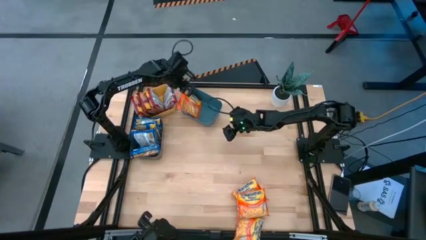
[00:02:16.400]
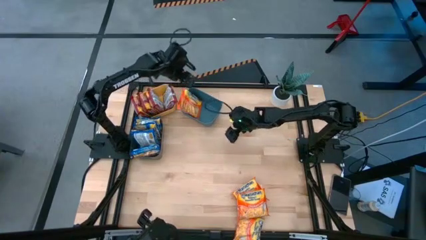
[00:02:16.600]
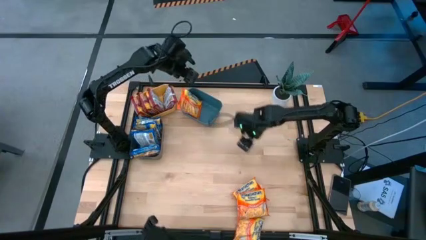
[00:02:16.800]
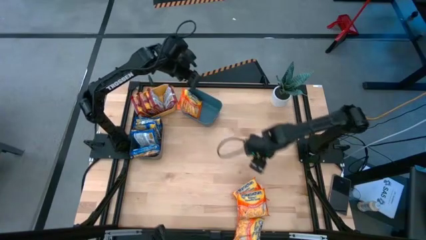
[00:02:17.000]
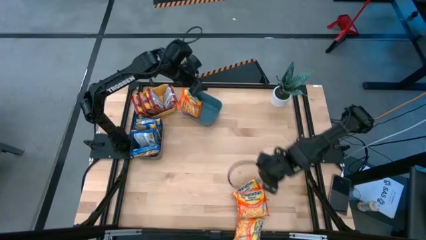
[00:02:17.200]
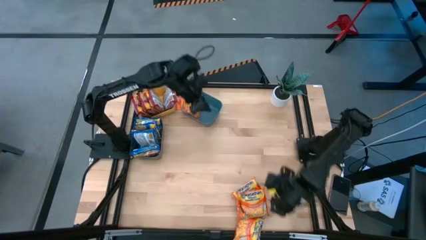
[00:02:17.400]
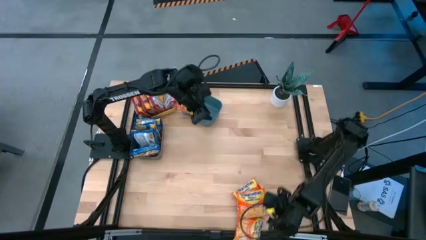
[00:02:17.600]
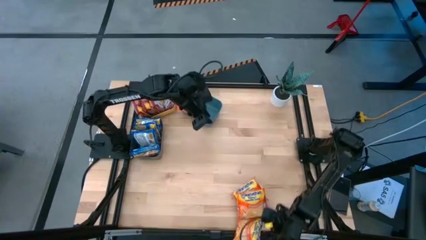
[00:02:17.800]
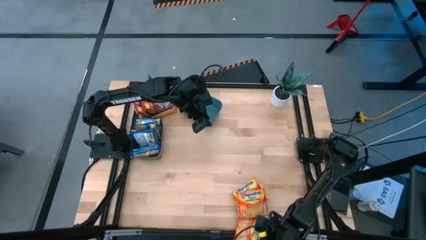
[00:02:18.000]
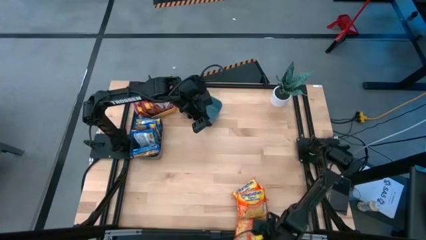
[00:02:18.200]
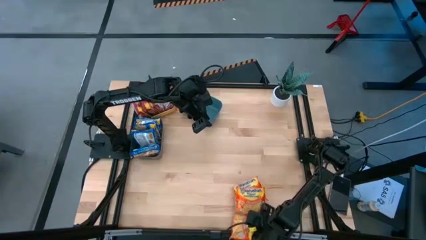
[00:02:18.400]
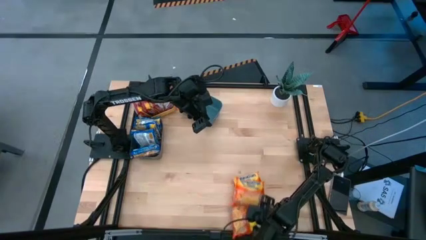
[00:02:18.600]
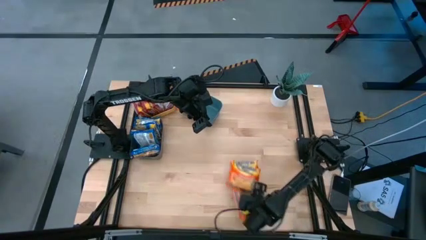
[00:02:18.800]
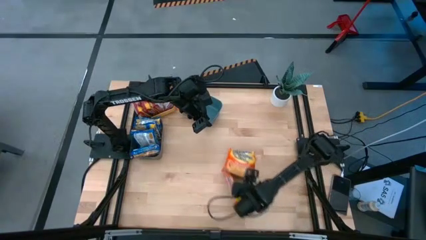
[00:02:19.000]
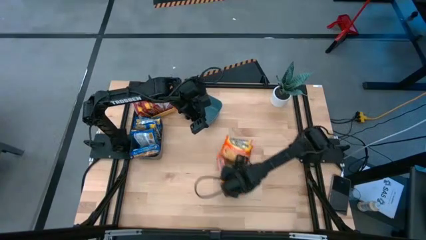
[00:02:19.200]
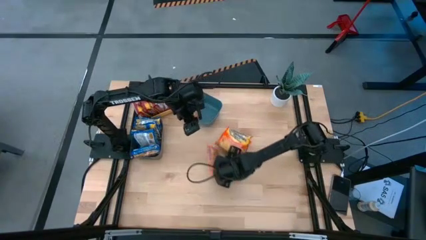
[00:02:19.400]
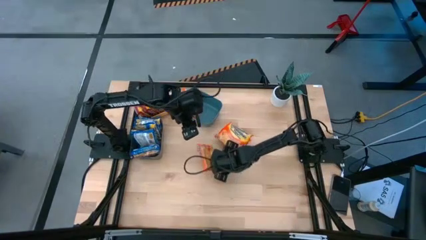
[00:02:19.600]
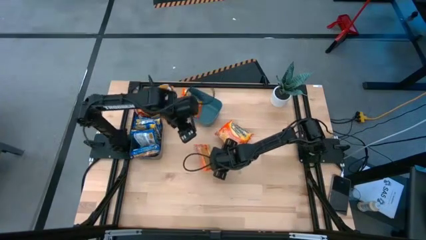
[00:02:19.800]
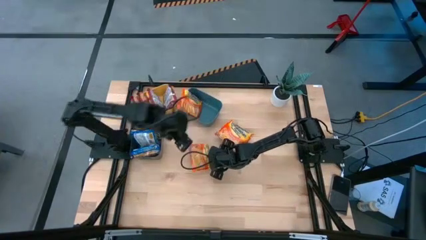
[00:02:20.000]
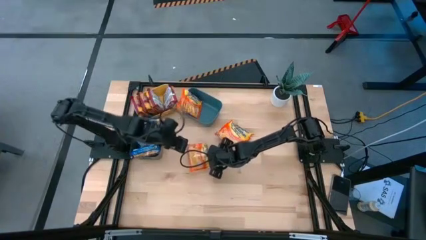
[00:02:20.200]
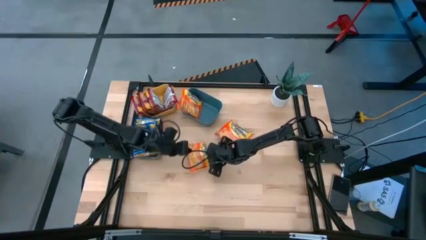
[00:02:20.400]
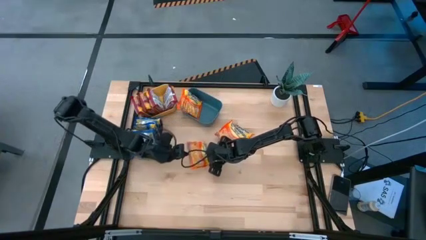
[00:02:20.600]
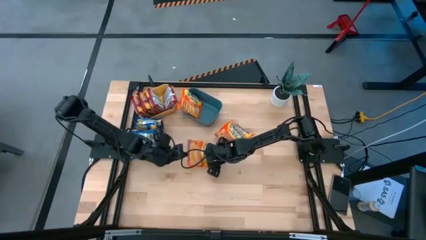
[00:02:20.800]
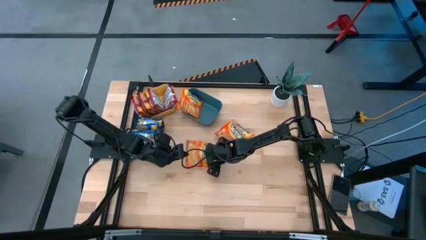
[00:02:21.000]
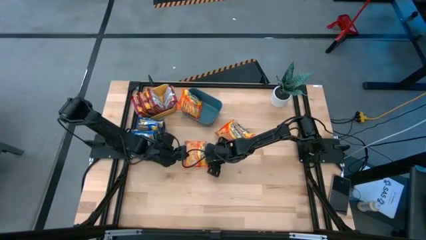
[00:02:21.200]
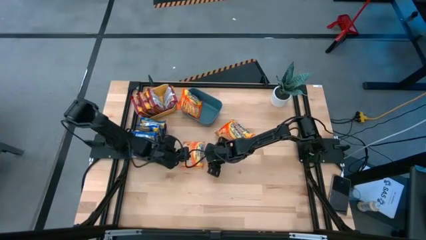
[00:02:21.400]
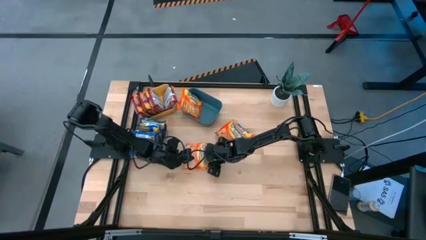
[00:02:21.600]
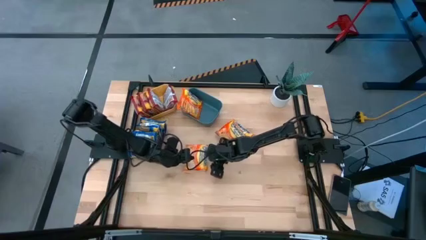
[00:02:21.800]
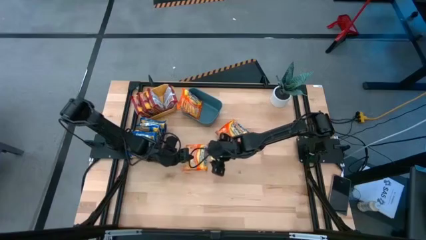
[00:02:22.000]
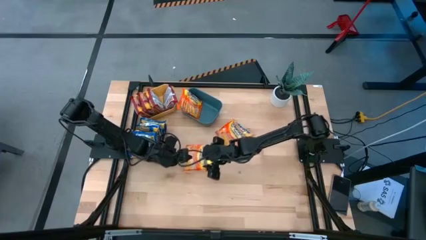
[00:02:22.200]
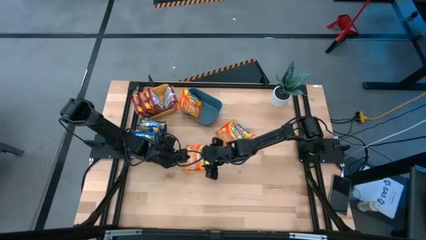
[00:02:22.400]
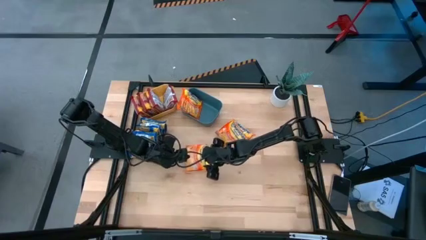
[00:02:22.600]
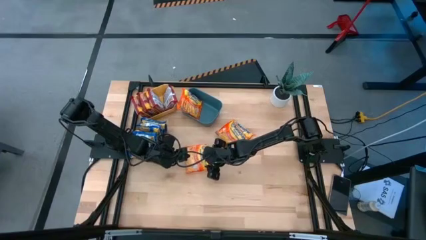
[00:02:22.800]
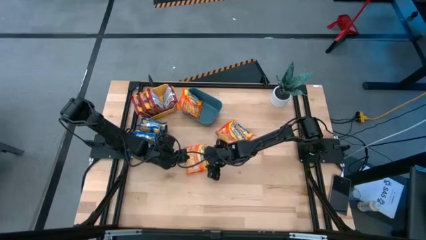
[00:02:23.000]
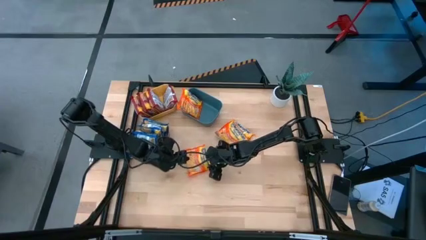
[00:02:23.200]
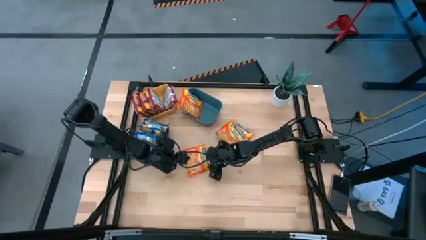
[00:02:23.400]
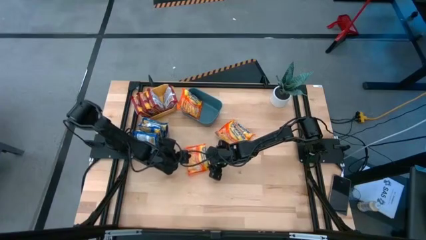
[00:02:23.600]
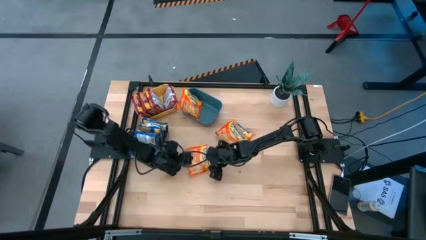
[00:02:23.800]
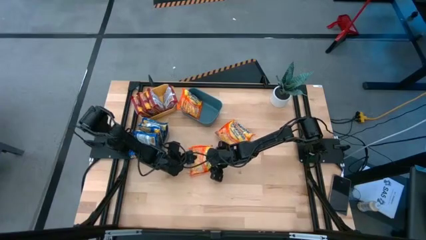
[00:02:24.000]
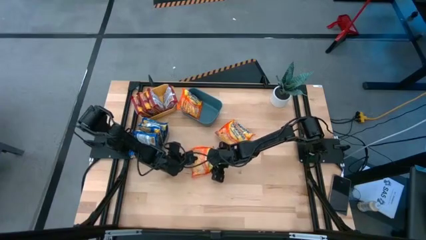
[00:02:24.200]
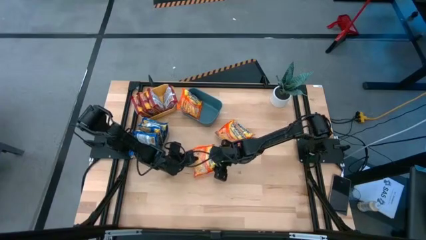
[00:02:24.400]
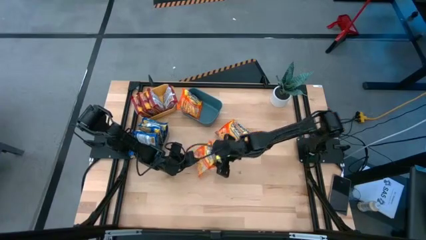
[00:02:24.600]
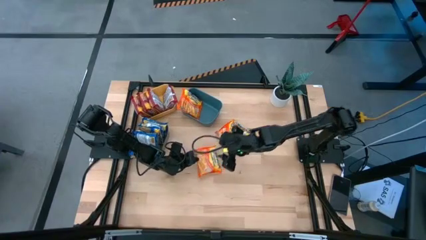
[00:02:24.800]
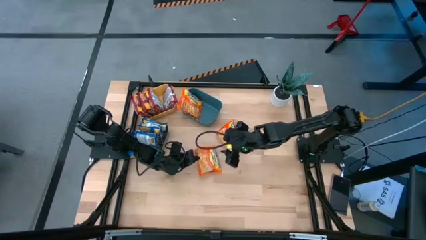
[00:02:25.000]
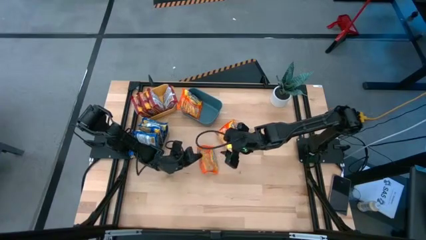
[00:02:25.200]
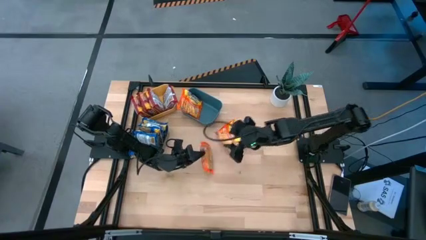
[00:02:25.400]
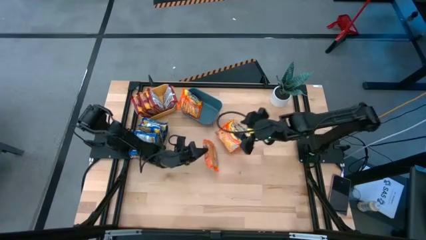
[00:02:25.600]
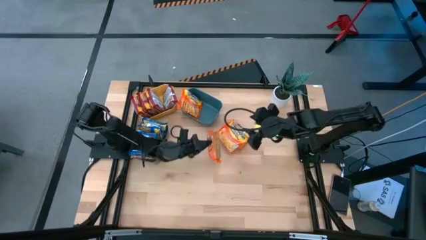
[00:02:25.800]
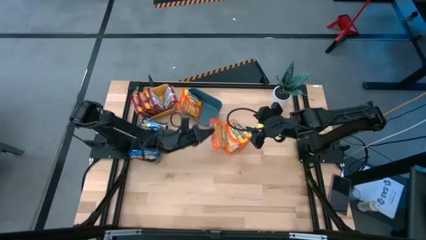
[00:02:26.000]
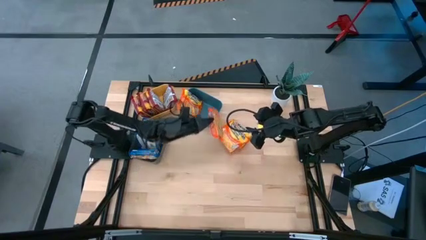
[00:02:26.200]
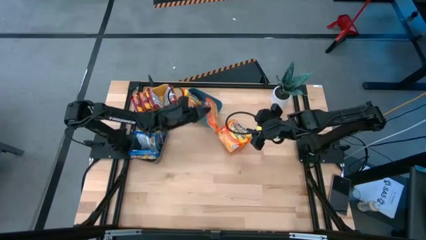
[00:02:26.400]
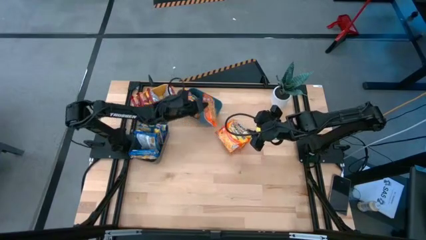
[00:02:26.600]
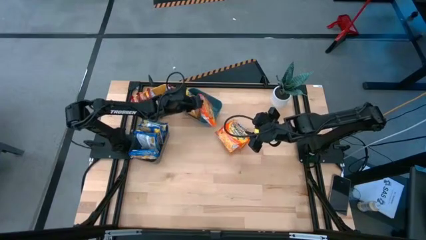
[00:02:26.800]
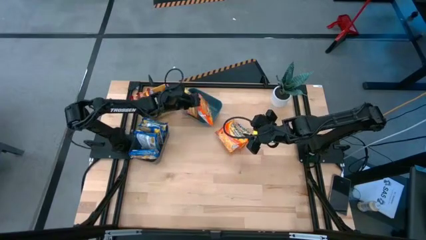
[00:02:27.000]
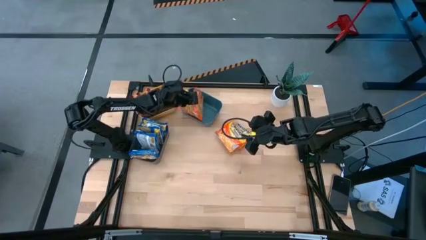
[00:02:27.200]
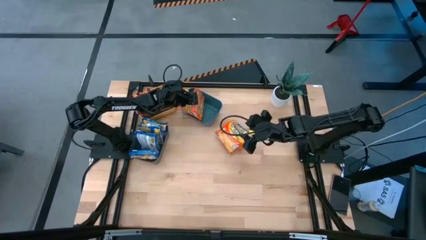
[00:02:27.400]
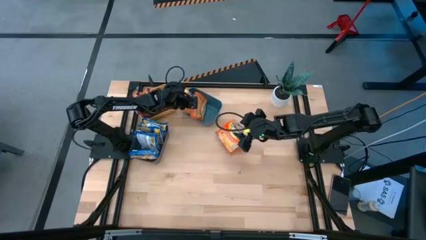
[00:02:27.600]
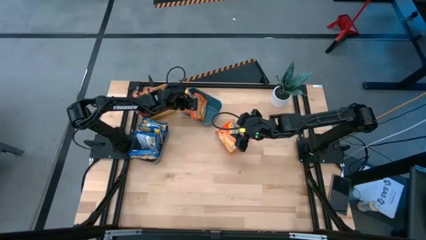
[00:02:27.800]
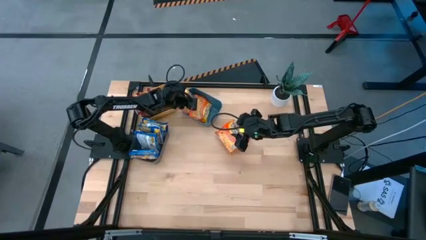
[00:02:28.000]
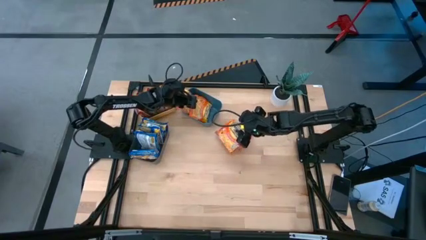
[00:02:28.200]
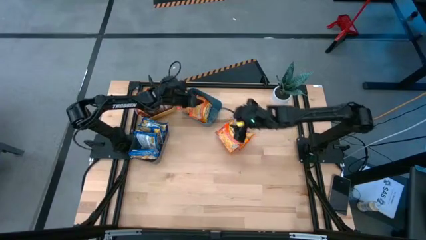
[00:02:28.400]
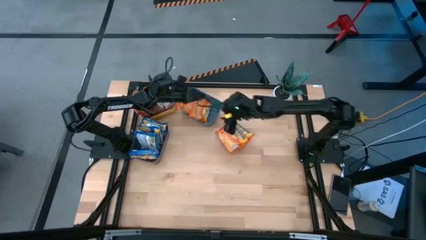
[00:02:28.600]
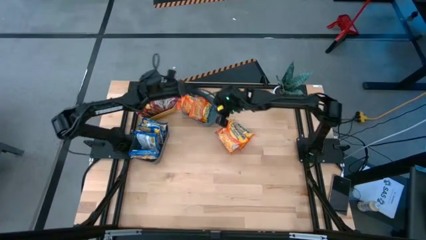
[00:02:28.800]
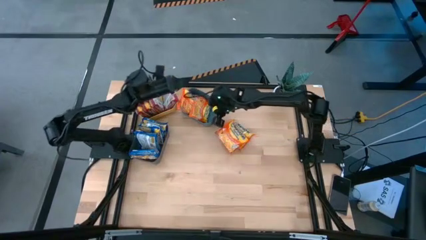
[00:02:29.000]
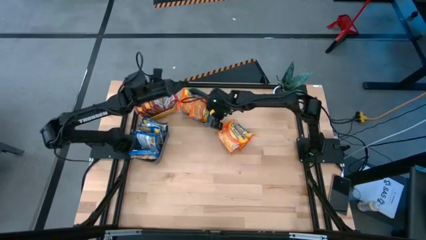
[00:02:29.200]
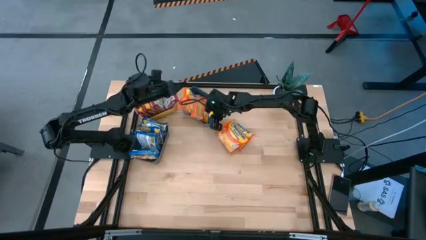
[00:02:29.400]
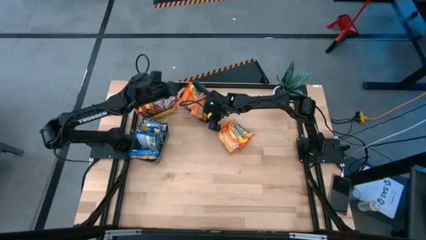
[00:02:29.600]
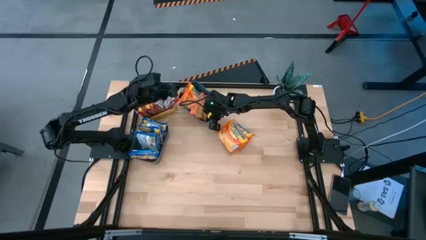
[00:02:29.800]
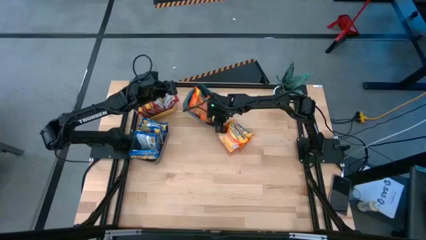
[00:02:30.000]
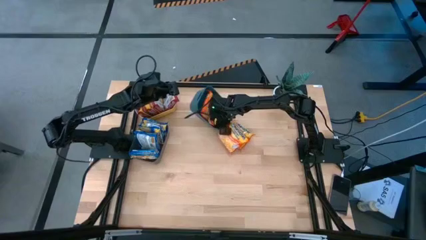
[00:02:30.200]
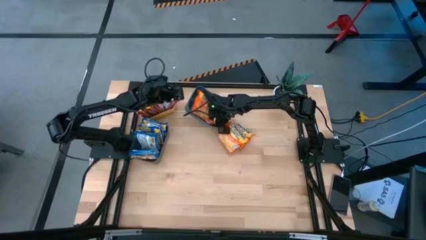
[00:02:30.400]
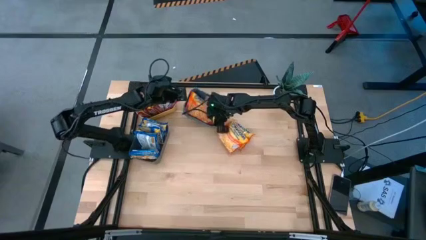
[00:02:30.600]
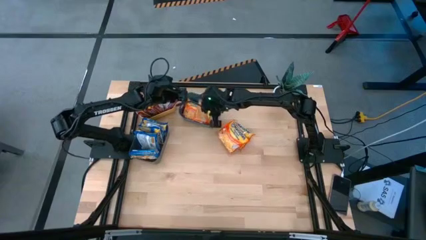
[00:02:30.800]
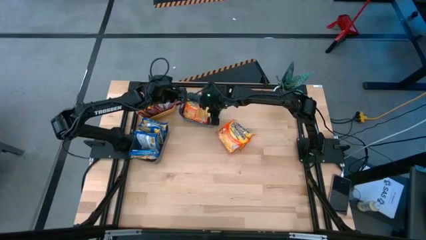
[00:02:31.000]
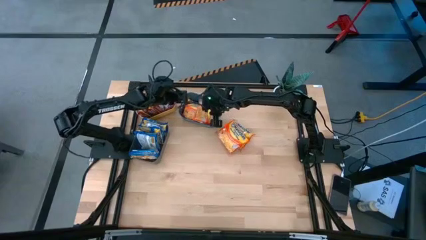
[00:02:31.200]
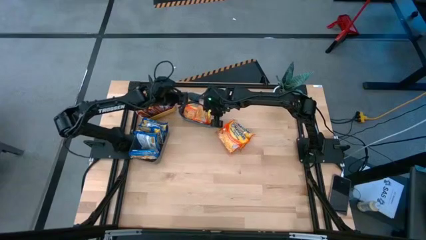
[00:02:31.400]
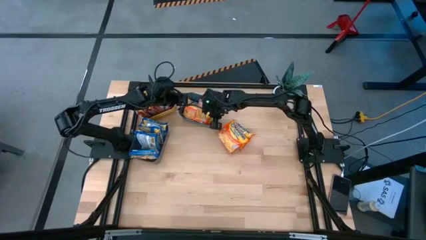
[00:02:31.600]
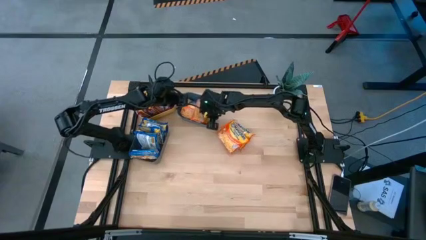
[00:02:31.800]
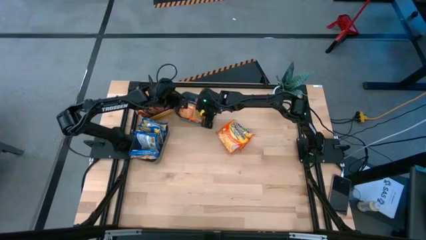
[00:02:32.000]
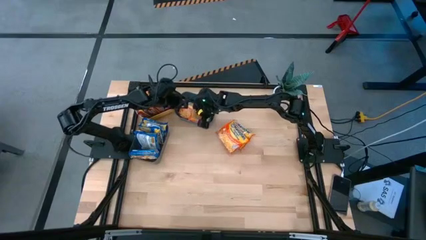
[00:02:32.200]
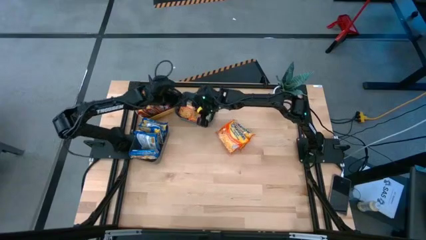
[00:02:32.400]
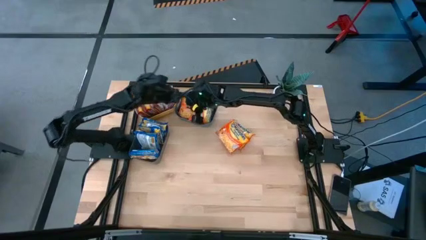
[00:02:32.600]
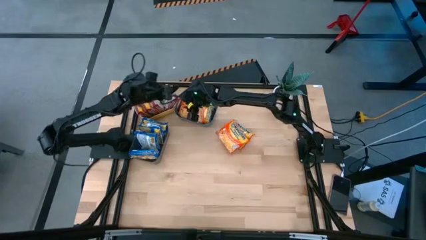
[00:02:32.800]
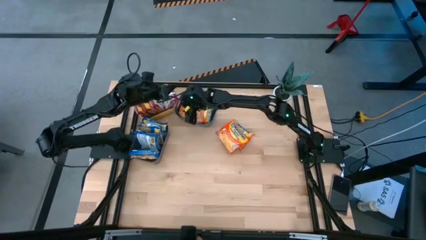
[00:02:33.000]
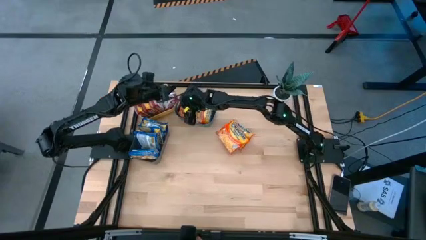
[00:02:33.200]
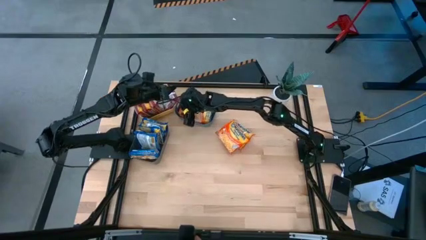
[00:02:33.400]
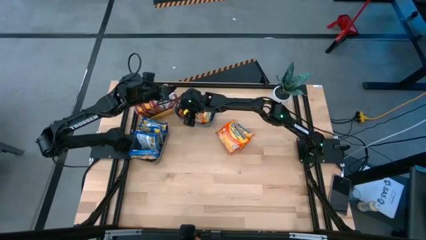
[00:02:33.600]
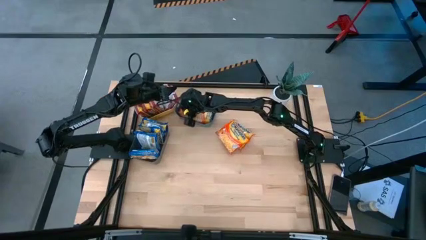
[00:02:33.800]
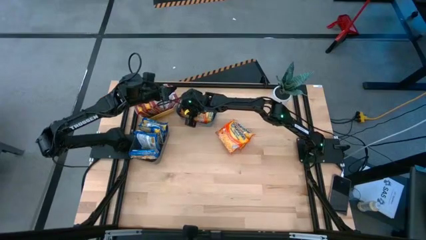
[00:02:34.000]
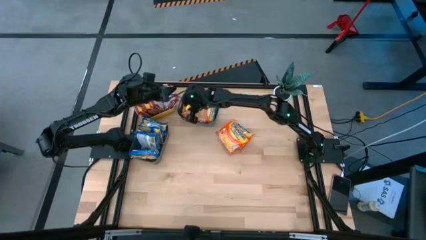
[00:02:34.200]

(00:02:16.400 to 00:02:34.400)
Task: Sort Maruchan noodles
Put the orange noodle pack into the blue bin
